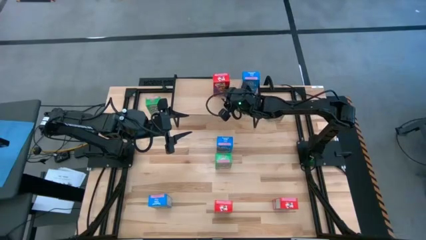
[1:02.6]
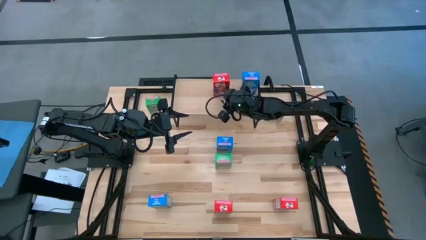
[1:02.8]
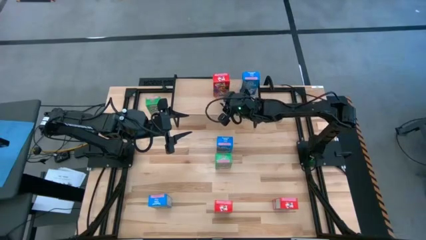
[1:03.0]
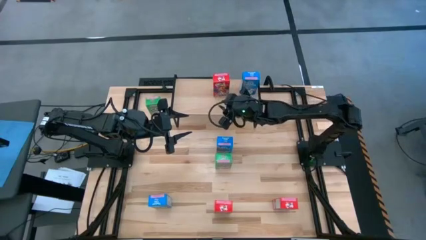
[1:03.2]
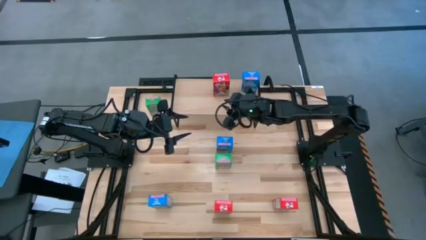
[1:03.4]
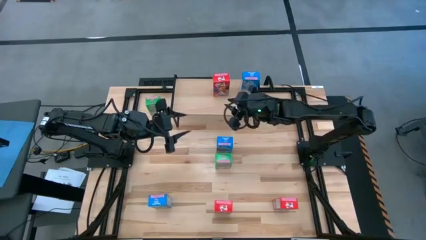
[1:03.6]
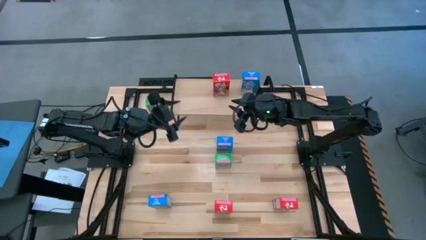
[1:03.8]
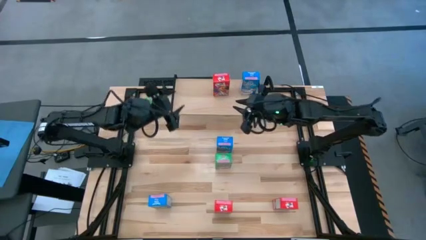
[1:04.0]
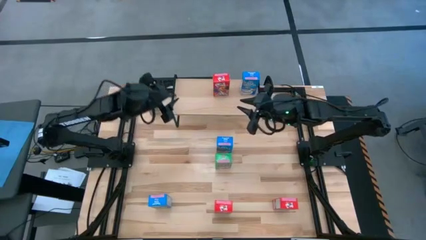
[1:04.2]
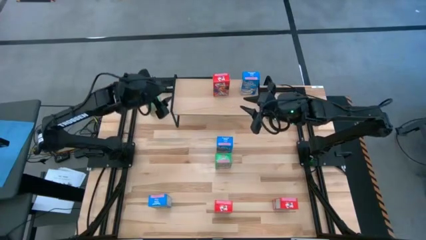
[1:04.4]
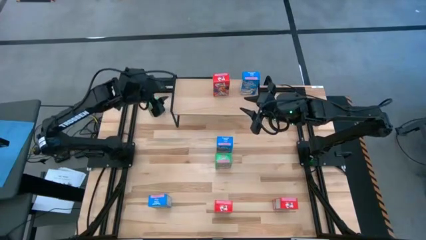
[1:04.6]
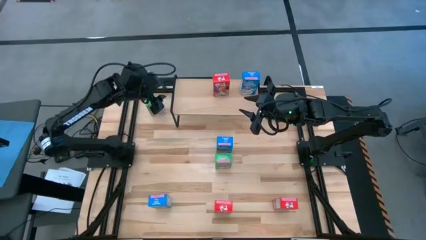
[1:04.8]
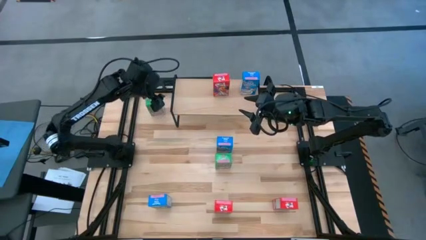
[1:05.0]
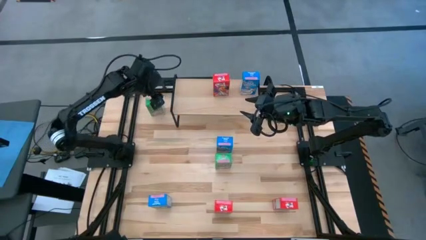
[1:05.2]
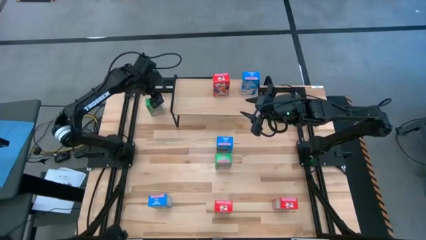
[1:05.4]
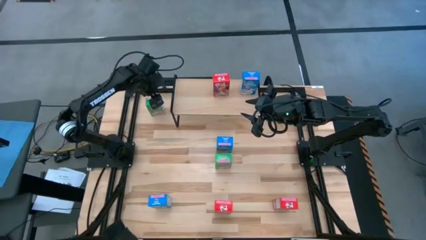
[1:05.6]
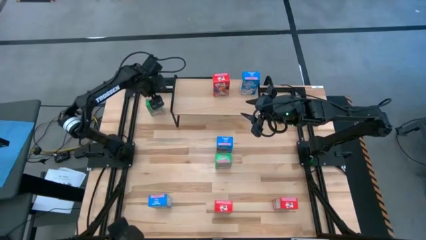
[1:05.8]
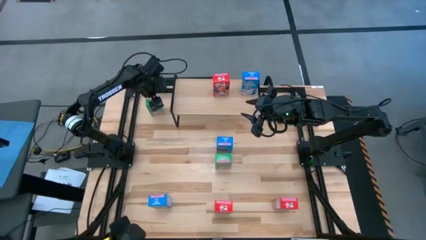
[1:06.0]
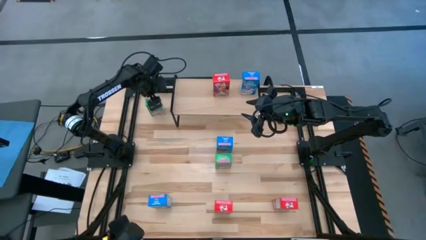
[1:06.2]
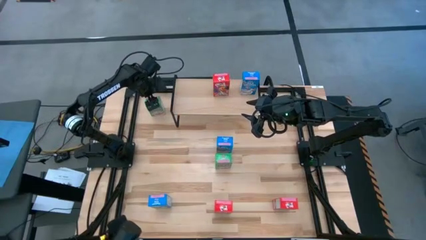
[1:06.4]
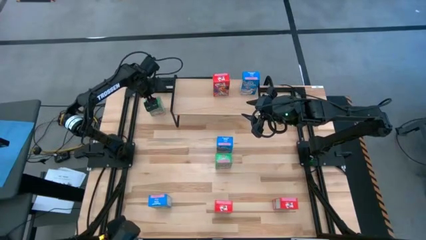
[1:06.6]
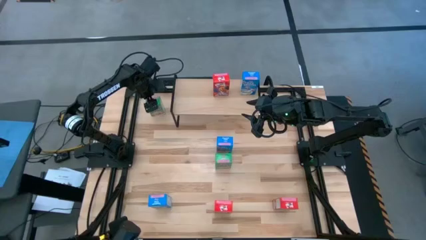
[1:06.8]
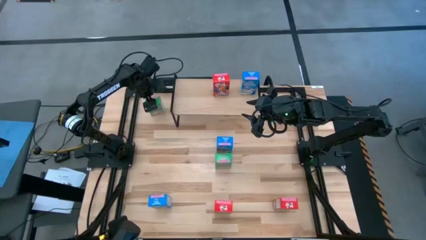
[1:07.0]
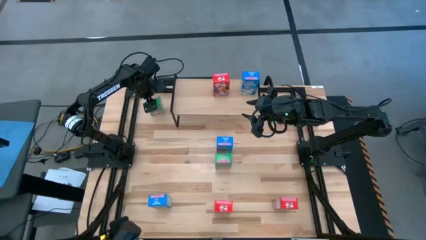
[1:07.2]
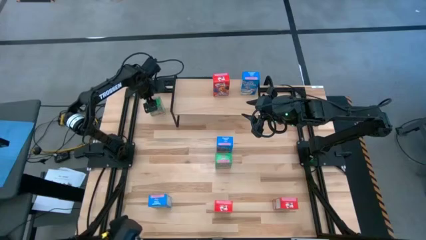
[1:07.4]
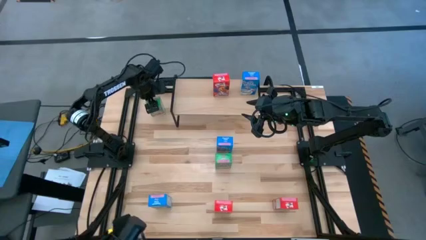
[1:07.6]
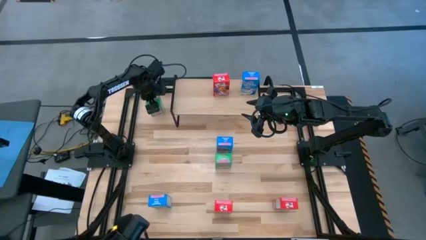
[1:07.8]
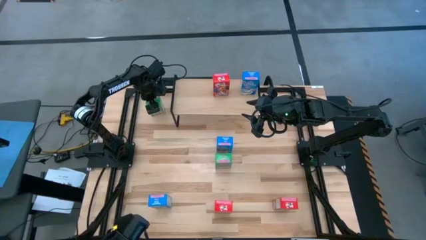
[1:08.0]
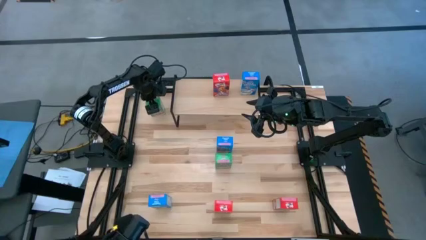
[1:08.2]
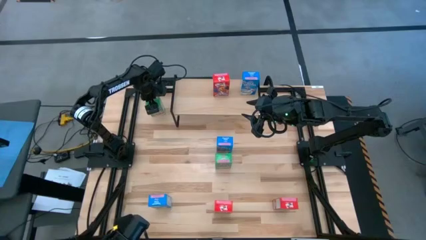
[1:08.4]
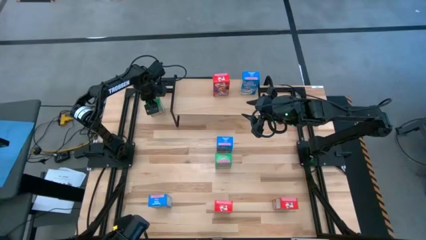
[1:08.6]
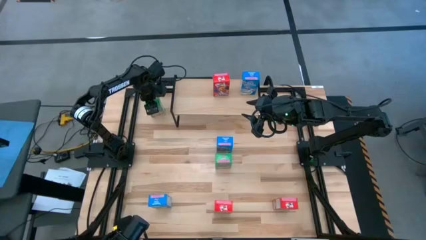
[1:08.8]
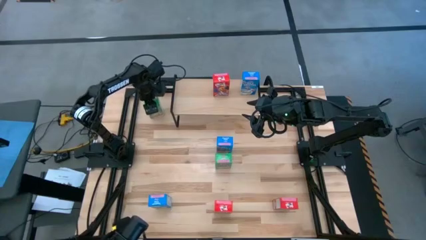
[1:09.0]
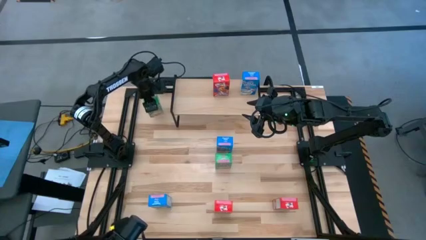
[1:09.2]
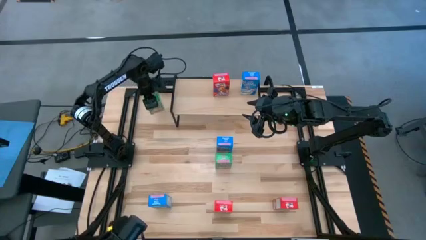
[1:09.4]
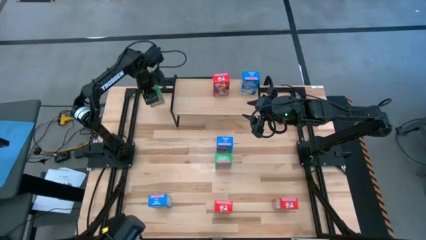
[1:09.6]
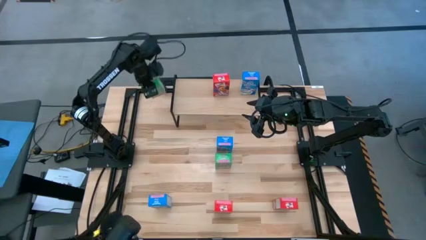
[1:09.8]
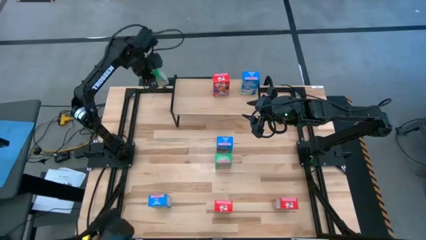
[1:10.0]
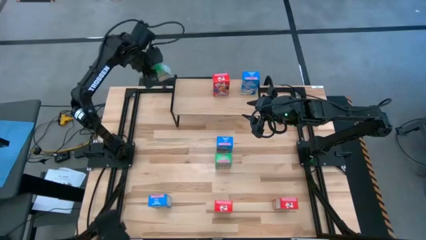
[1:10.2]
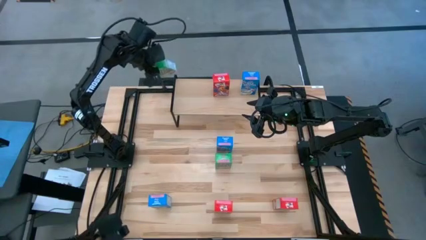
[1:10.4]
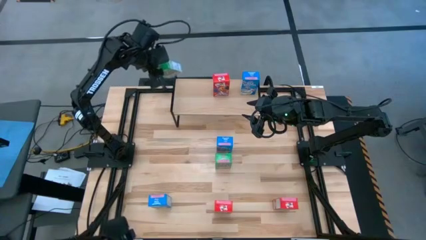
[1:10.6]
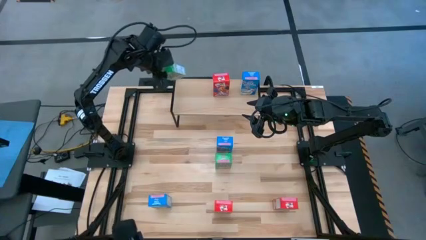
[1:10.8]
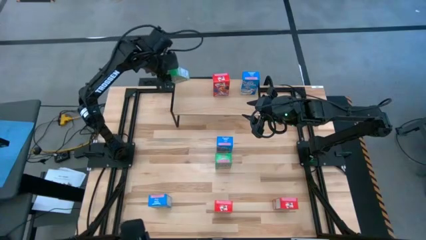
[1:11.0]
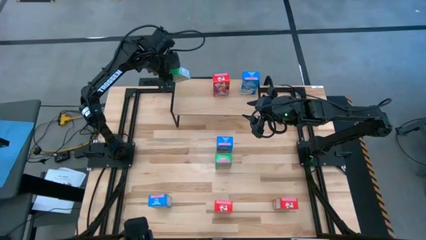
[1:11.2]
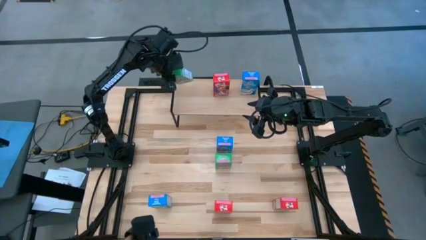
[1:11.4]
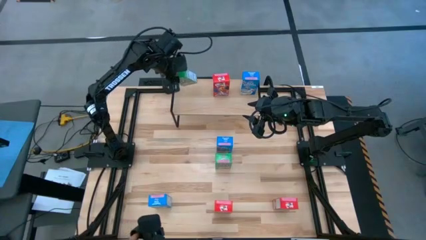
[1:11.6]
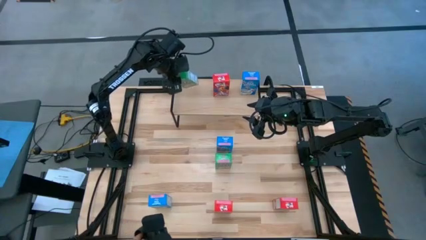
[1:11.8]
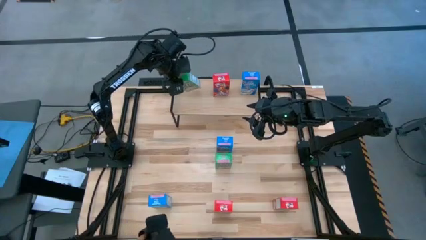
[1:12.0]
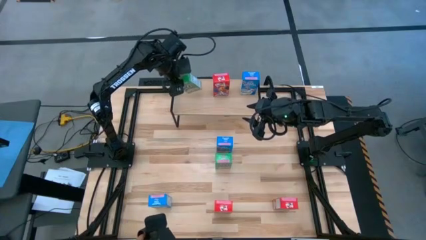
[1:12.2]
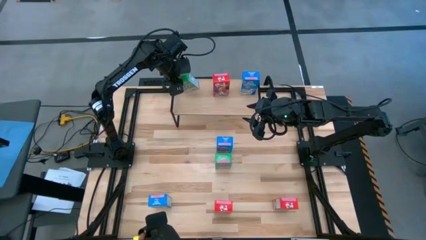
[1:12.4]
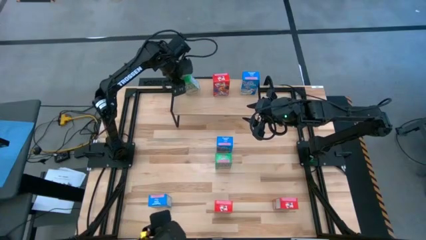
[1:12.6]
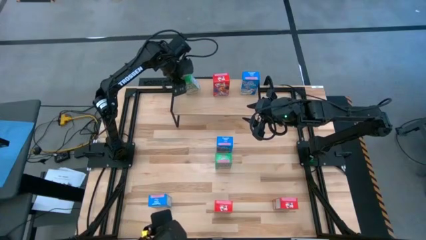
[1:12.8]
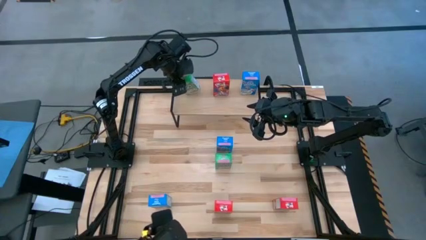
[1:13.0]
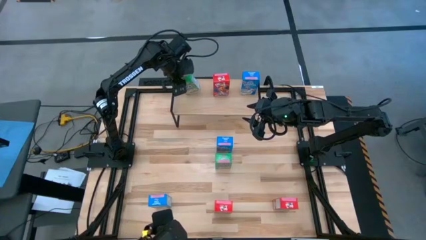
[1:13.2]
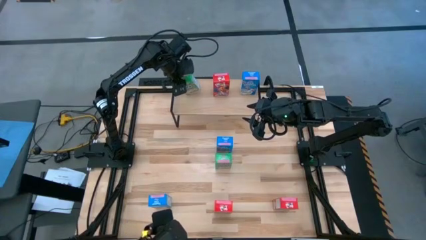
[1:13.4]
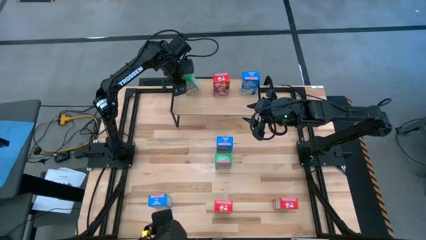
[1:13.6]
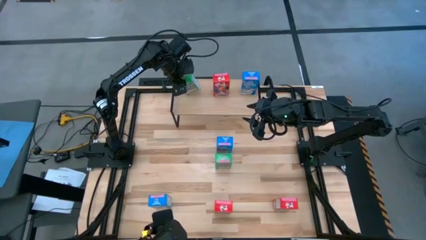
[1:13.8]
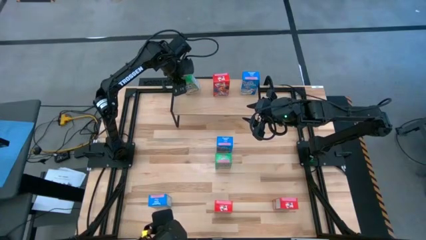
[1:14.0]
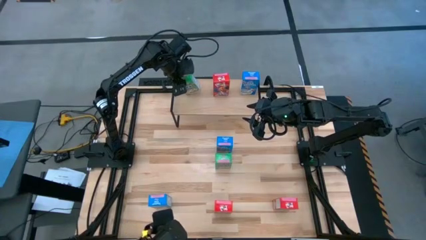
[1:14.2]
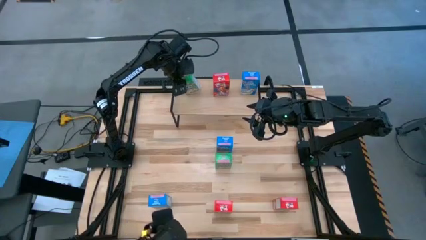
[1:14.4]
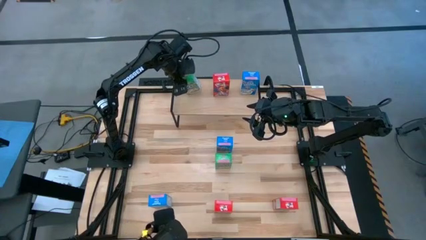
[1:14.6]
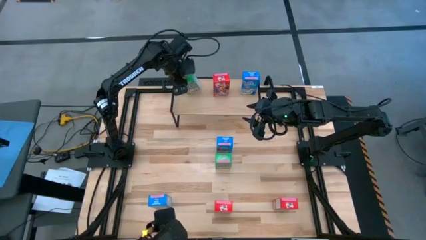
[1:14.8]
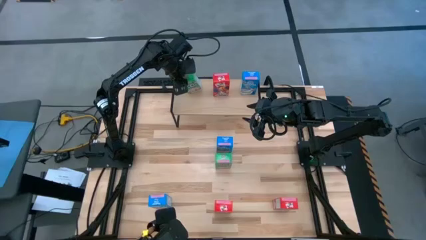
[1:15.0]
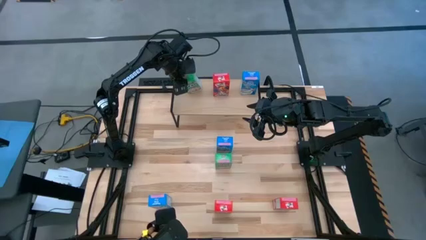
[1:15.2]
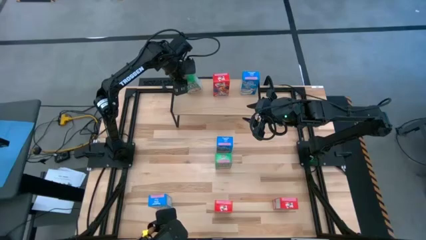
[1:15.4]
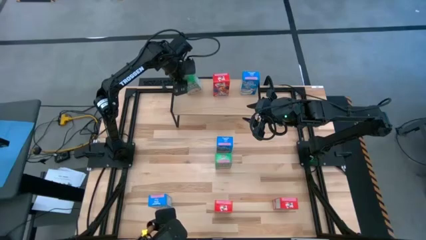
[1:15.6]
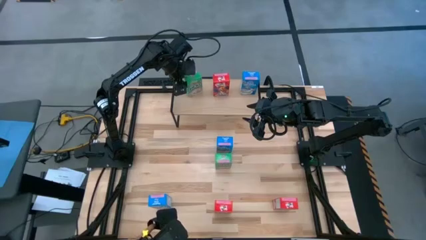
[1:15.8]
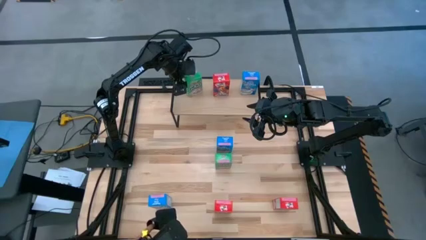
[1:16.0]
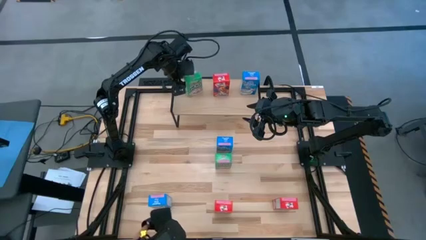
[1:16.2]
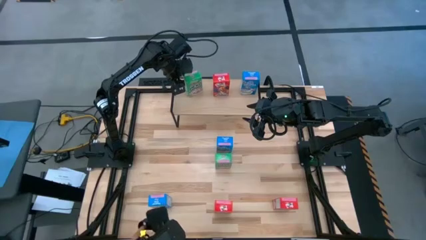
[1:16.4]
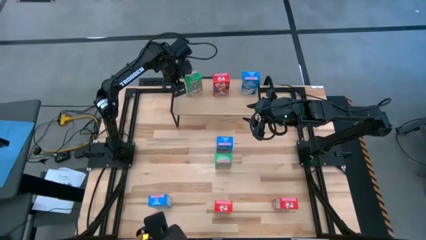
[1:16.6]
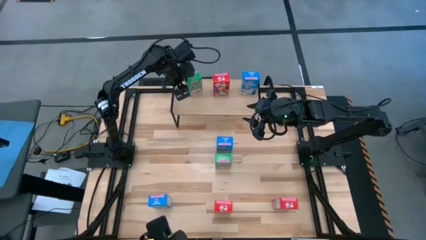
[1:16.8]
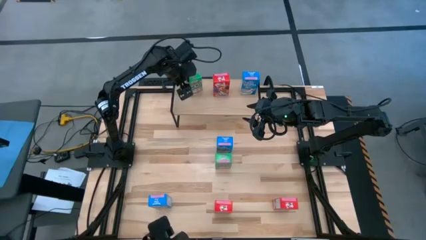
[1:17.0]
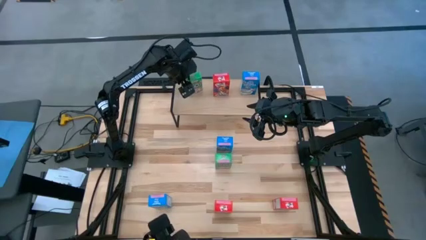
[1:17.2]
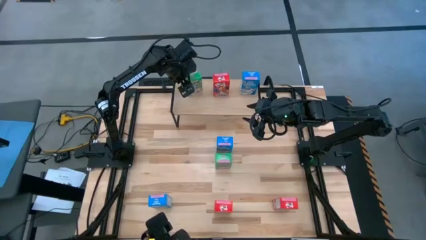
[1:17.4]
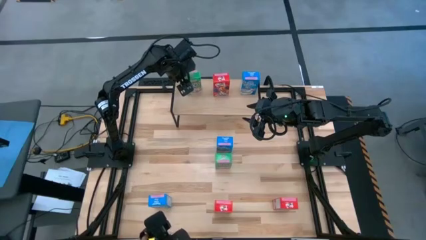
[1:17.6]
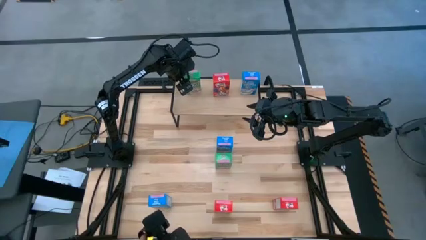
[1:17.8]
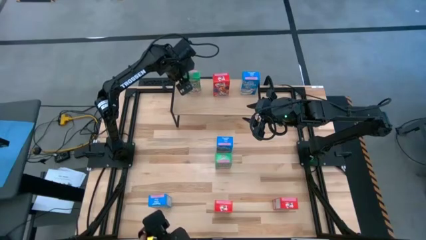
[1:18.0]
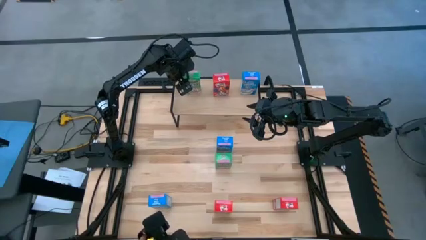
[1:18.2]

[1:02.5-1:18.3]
Task: Stack cereal on shelf
Put the top left green cereal box on the shelf

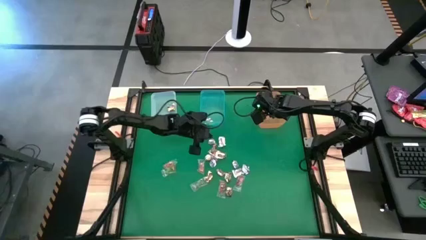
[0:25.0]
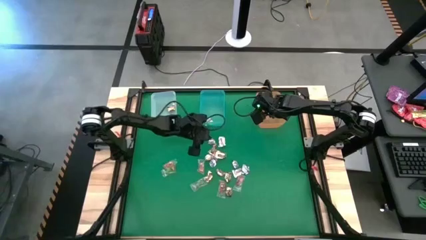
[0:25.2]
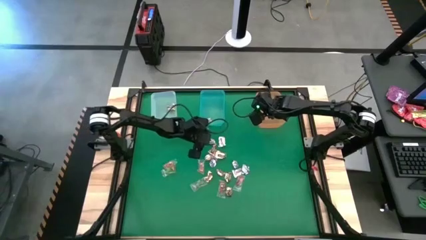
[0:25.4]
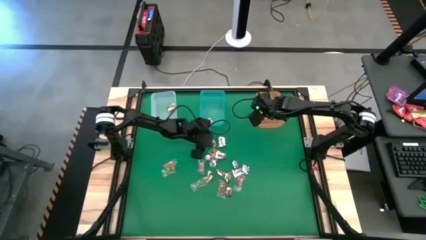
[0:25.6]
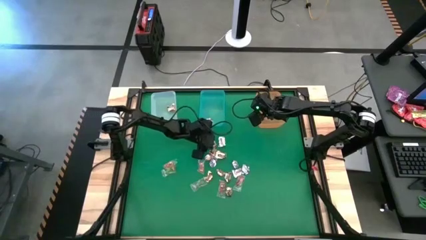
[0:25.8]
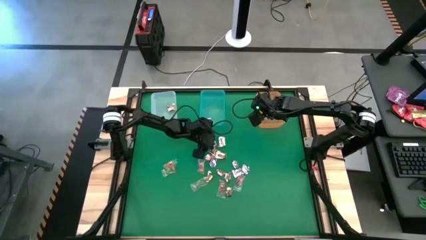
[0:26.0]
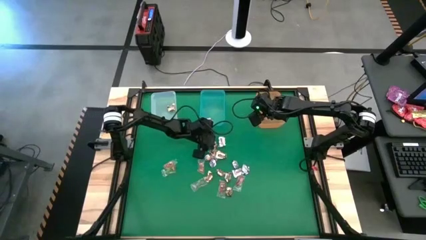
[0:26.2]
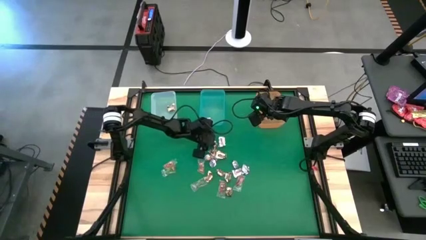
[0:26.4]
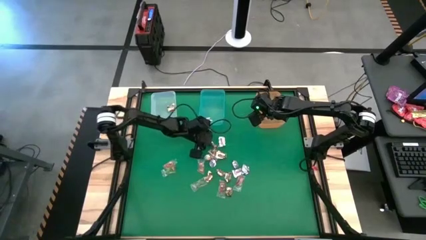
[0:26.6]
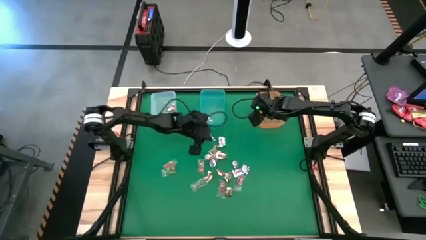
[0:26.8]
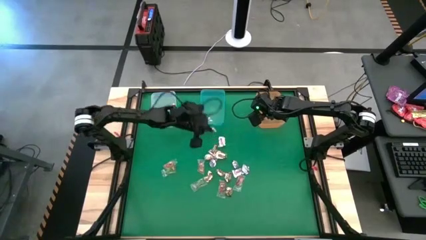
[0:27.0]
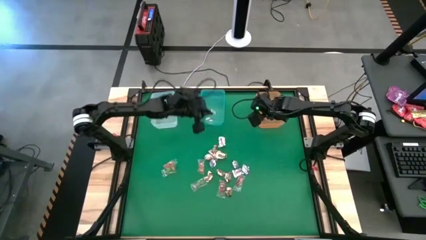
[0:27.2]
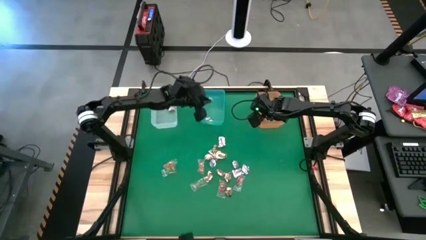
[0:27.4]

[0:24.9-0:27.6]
Task: Sort candy by brand, put in halloween buckets
Put the silver wrap candy into the blue bin
